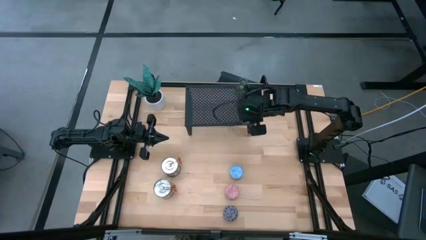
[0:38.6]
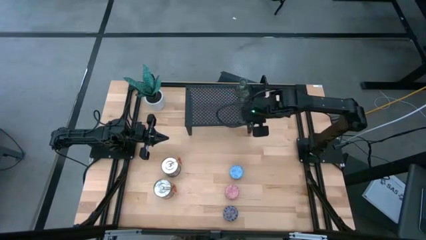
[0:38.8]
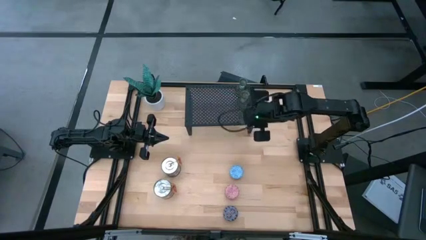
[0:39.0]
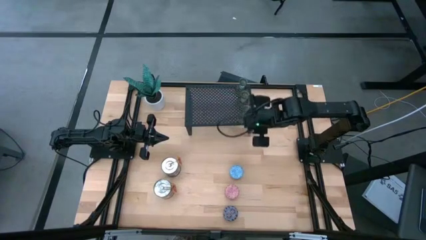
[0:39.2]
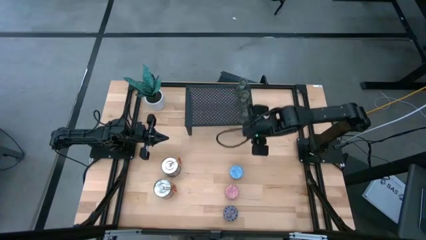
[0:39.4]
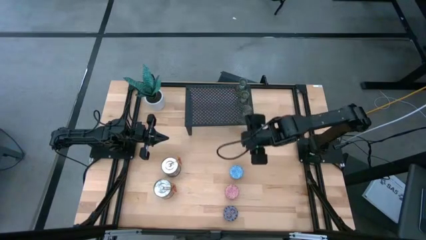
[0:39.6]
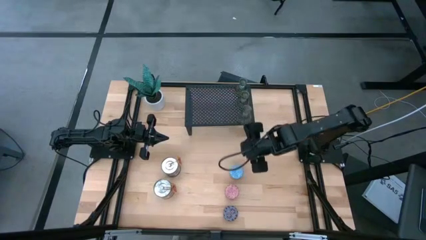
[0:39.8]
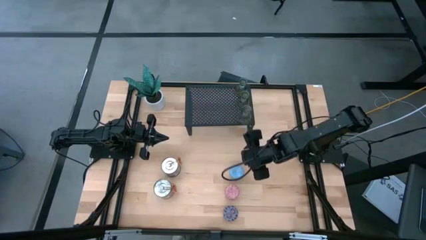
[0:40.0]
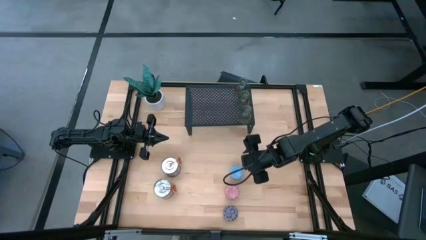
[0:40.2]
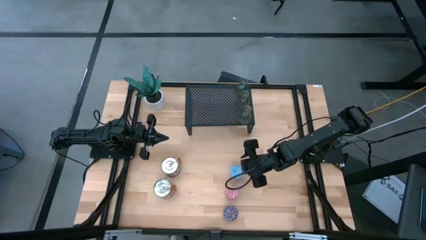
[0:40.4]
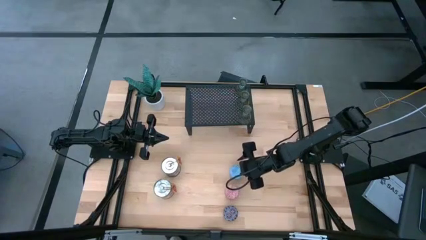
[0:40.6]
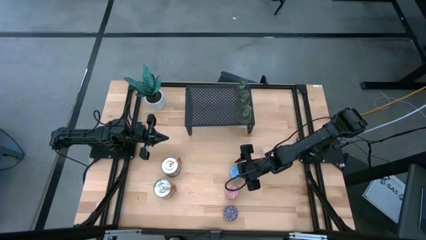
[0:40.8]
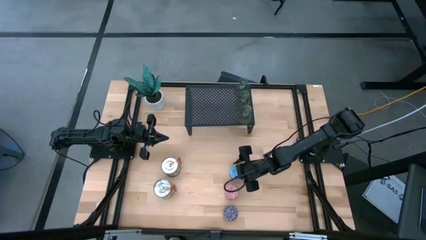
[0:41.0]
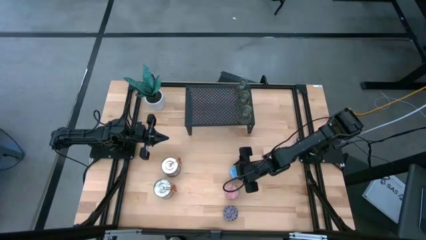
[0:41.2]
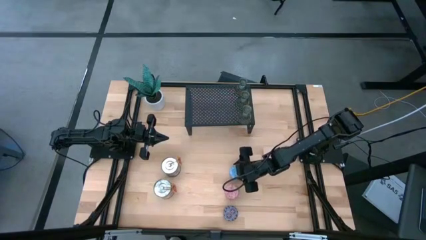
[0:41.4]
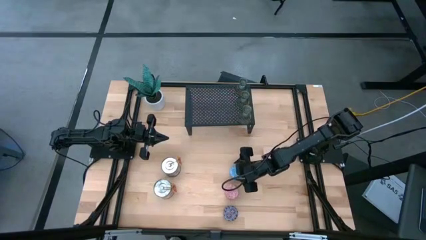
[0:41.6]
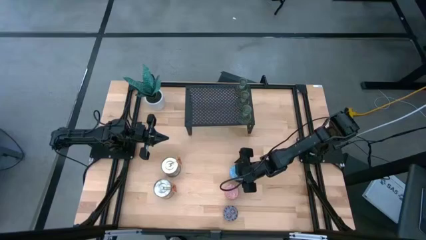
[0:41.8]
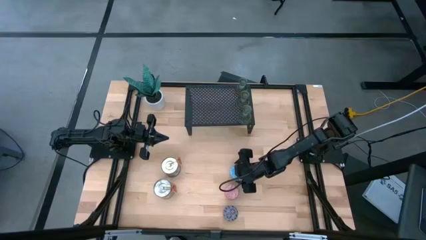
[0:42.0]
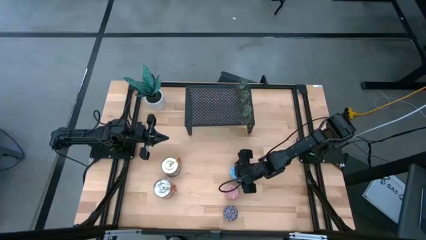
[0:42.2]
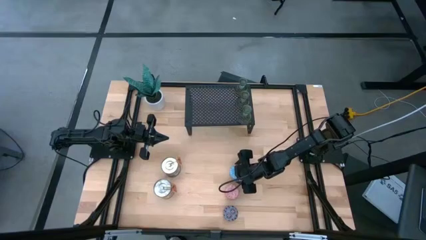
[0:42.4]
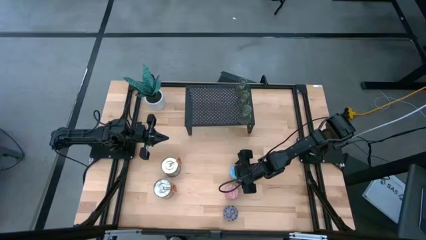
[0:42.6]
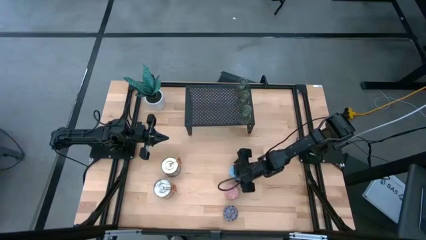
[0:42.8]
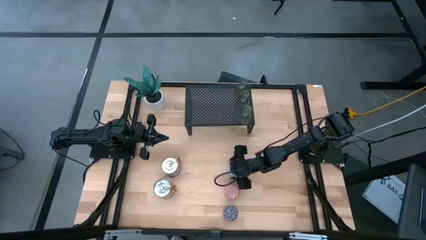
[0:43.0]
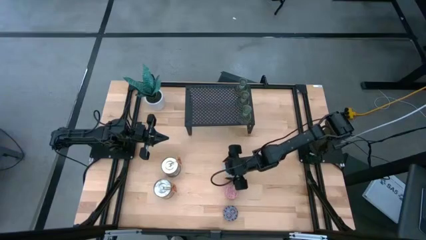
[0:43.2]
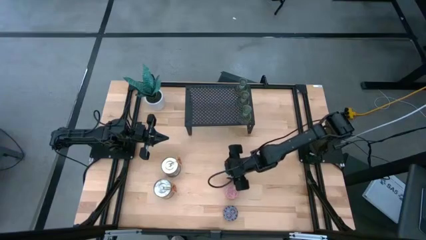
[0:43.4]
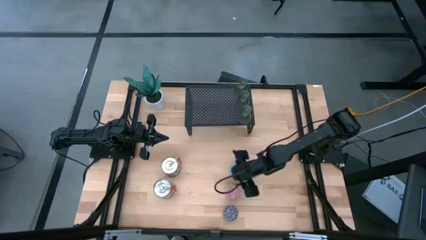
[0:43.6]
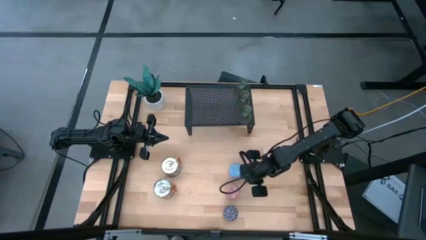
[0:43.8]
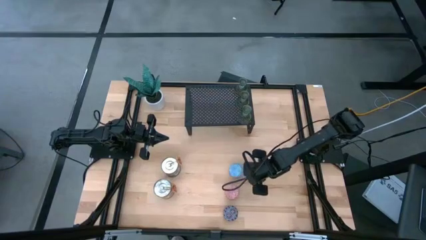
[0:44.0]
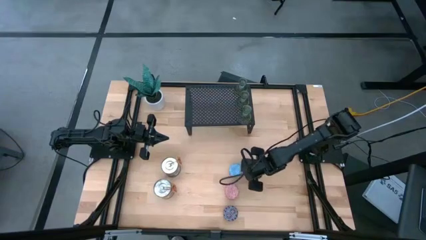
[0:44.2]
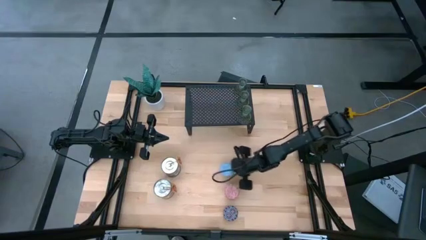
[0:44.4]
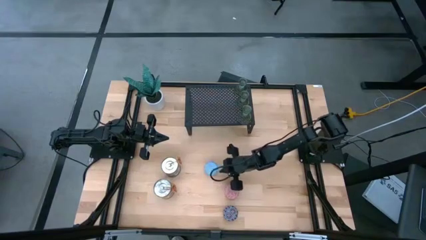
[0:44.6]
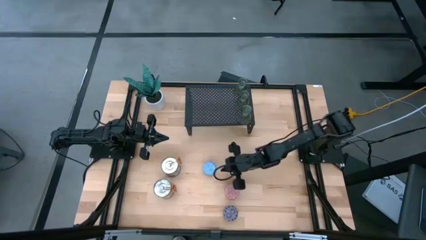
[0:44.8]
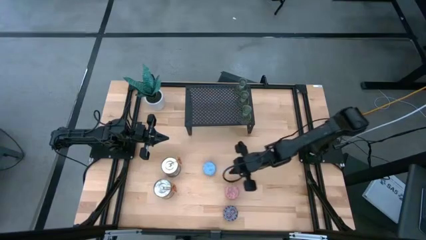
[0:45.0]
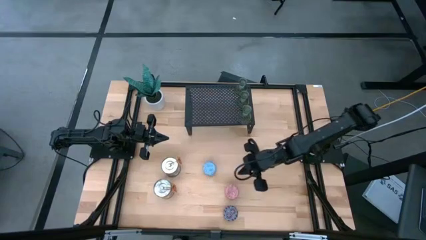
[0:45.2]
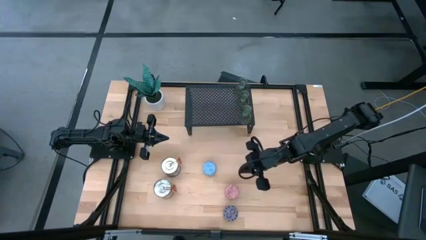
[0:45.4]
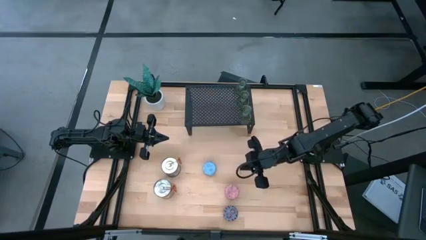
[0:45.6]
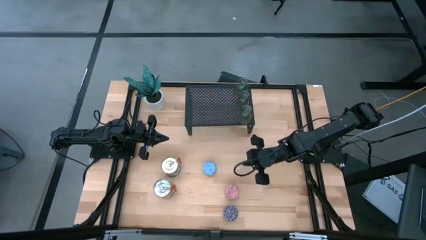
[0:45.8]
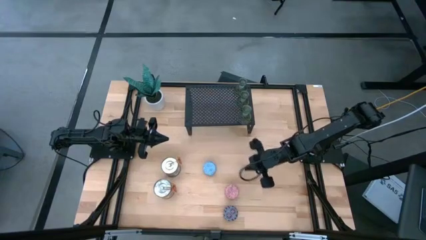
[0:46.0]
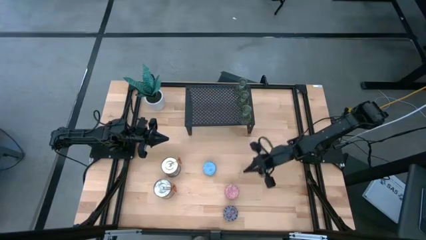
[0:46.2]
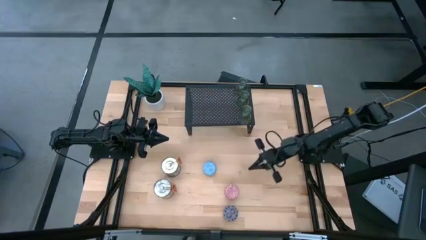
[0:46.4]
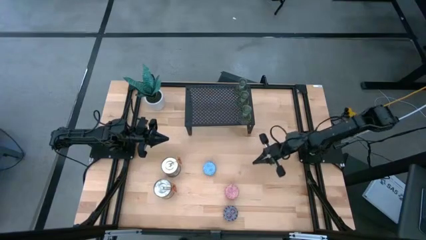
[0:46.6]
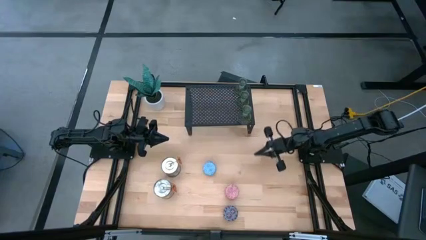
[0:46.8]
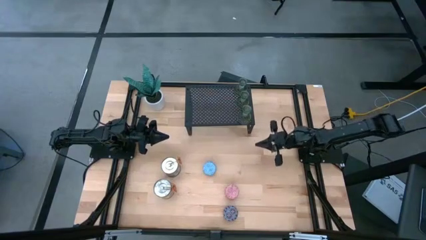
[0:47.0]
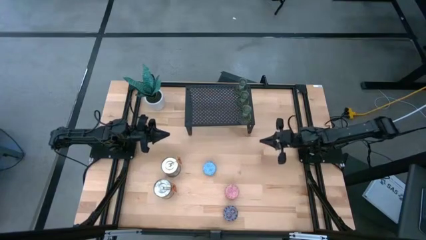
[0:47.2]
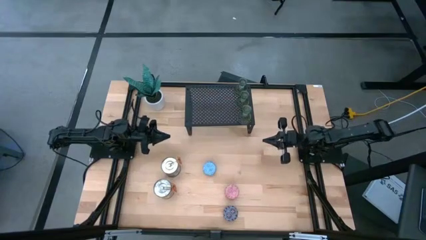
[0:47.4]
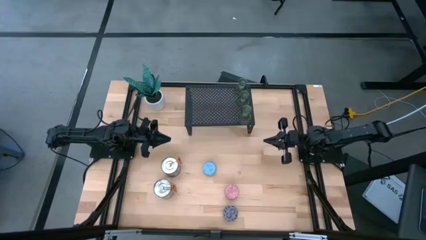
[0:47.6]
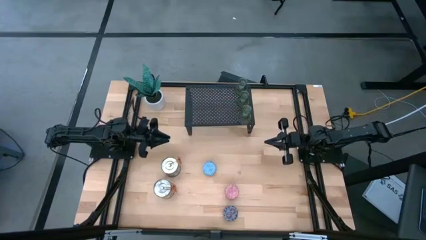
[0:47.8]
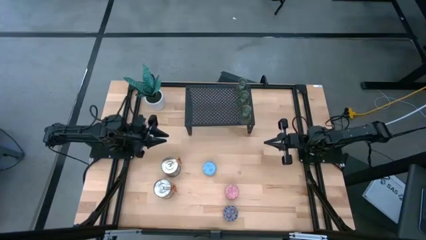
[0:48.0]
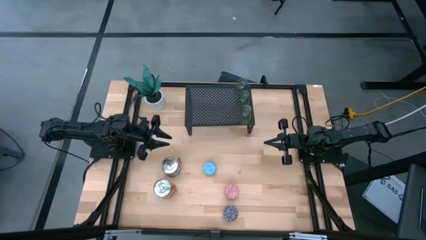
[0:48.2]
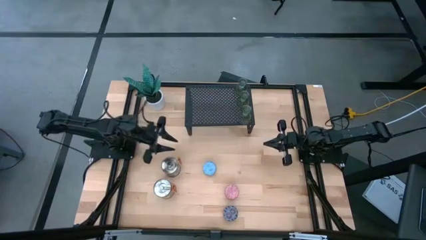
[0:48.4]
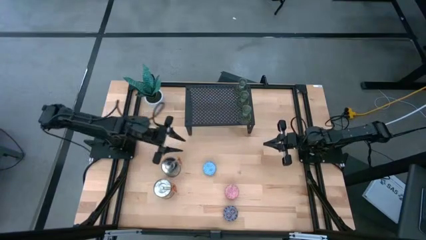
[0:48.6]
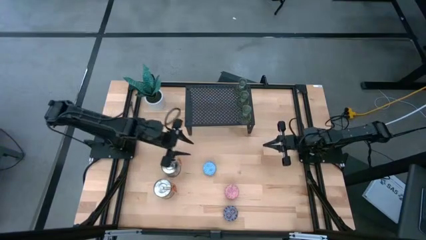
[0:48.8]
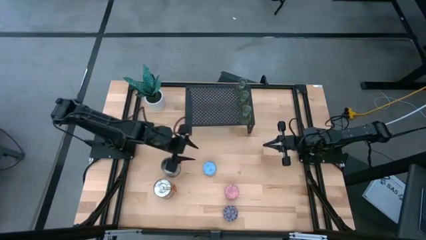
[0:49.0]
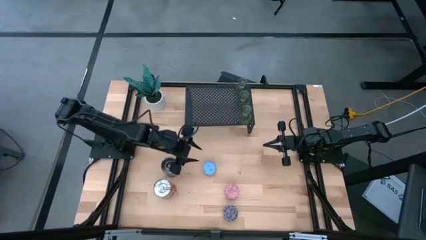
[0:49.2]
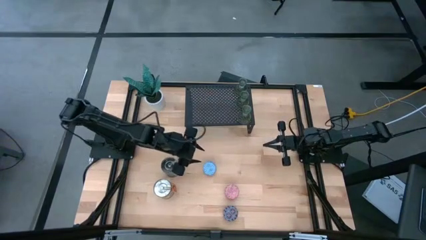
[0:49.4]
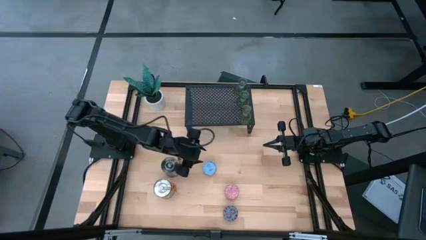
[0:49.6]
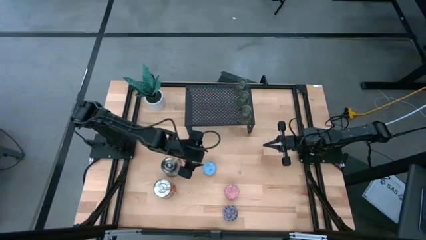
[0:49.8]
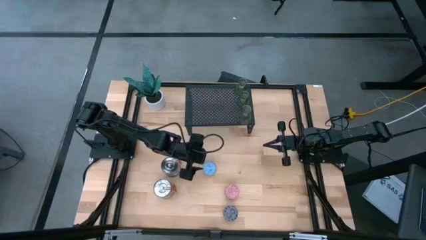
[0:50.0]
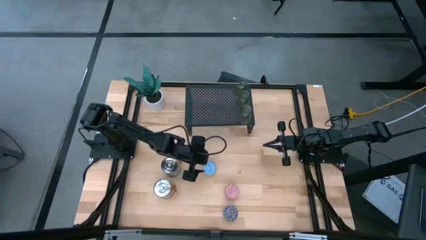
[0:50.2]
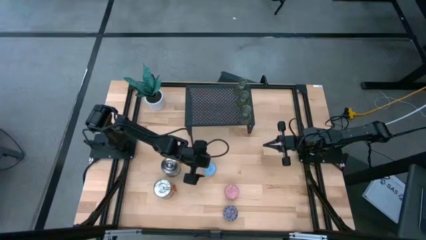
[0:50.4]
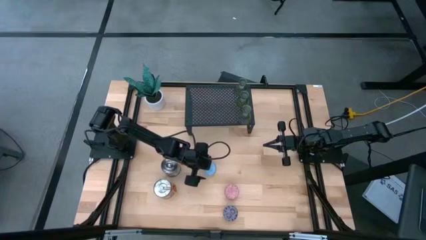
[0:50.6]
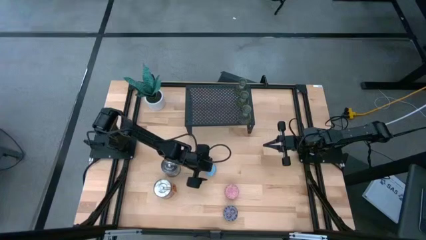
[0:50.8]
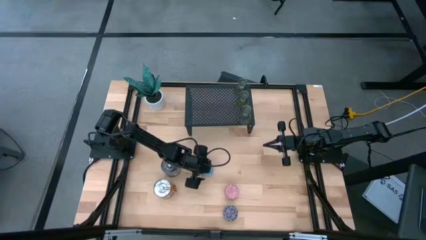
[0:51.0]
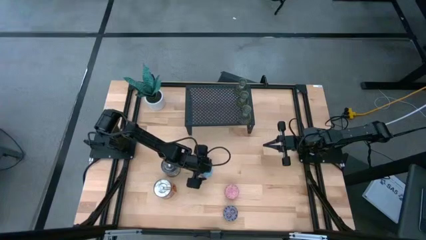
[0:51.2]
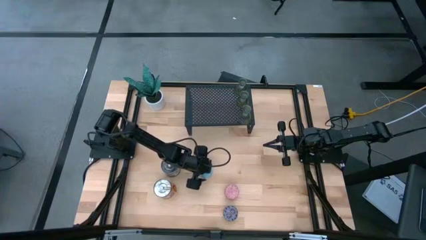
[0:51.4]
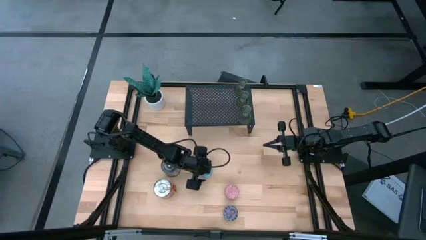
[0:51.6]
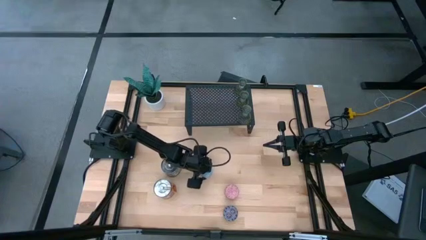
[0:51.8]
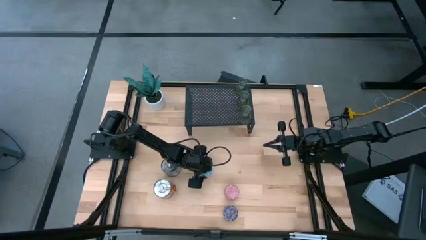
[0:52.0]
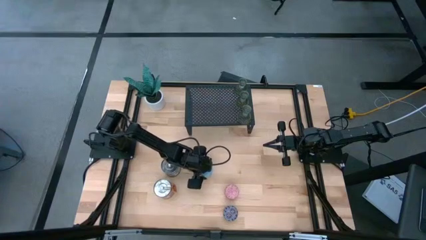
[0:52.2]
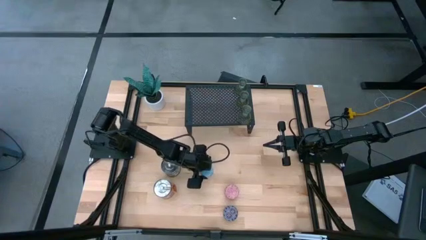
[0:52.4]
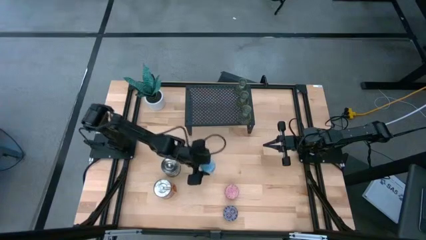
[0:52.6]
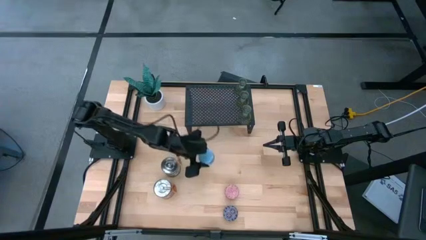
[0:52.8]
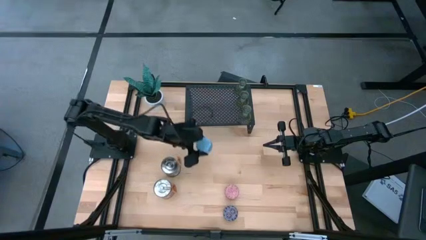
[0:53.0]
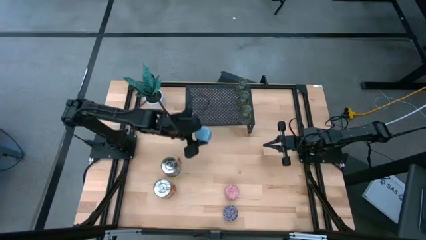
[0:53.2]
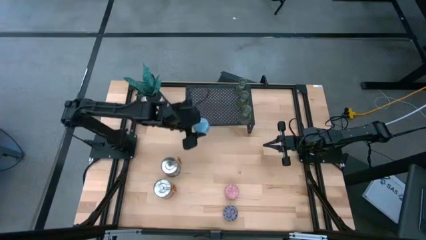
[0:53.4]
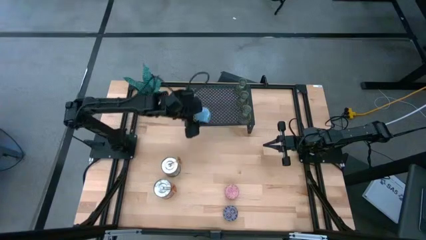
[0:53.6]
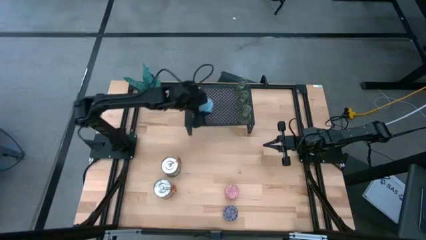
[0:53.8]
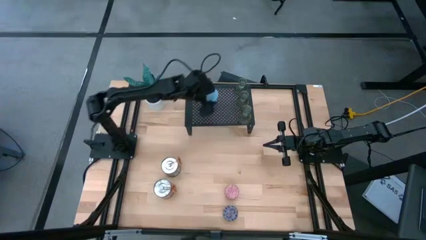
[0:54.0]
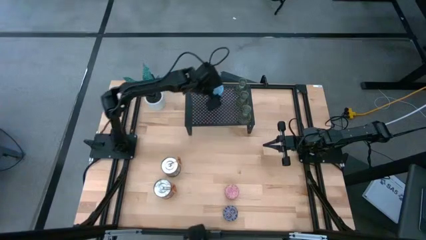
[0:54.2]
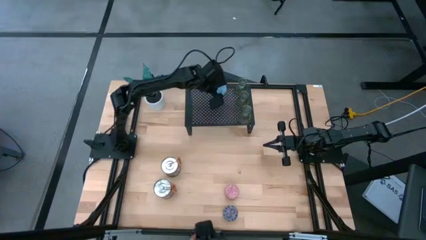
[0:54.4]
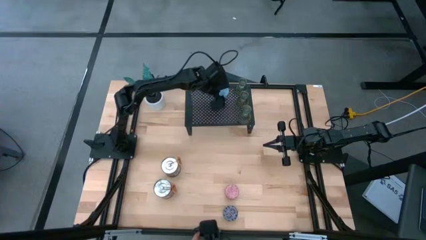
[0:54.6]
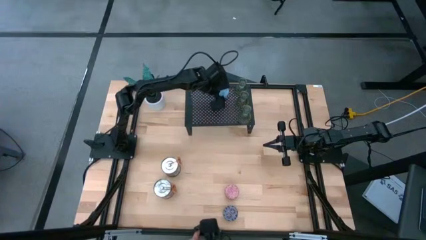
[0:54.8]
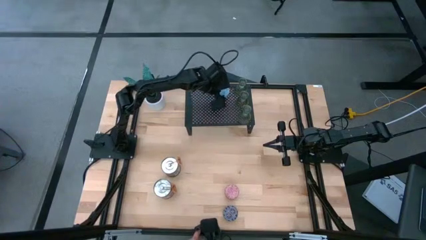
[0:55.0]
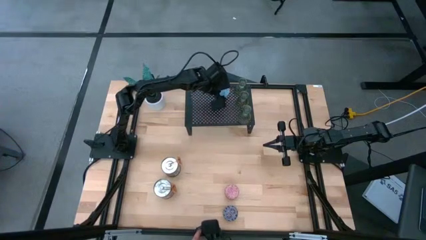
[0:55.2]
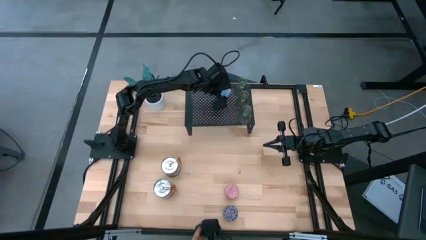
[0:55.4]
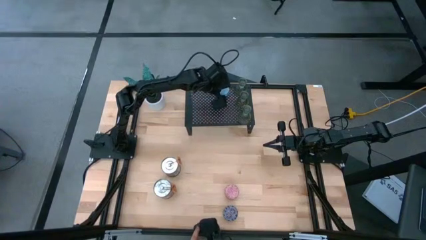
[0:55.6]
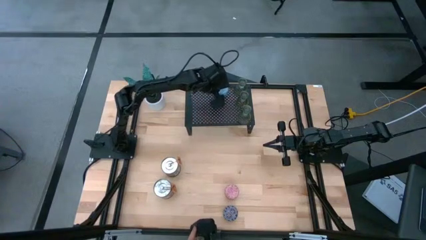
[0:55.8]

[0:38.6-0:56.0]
Task: Pick & Place candle stick holders
Put the blue scented candle on the shelf
